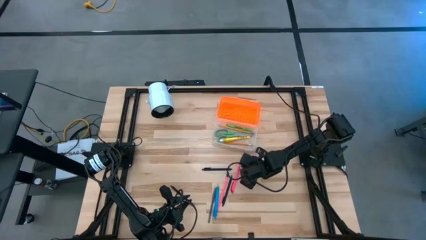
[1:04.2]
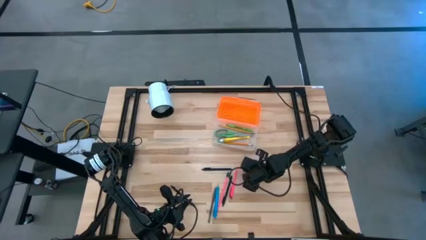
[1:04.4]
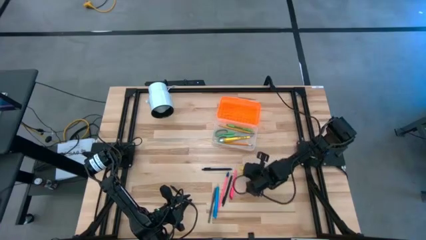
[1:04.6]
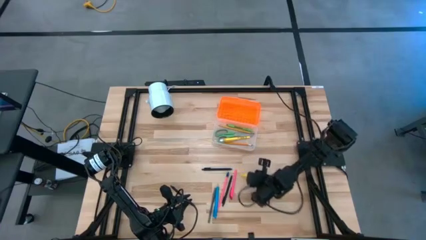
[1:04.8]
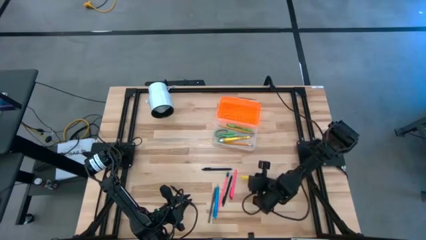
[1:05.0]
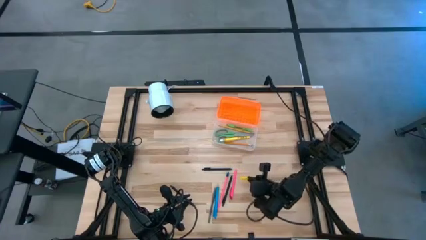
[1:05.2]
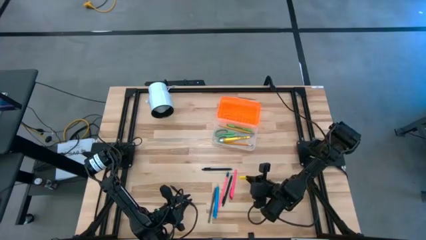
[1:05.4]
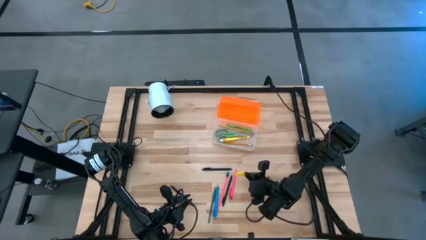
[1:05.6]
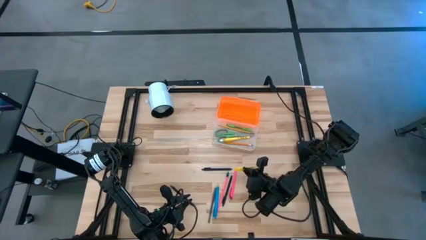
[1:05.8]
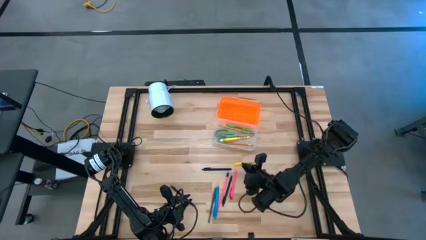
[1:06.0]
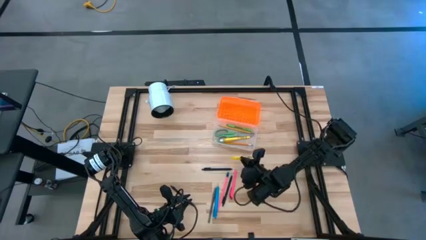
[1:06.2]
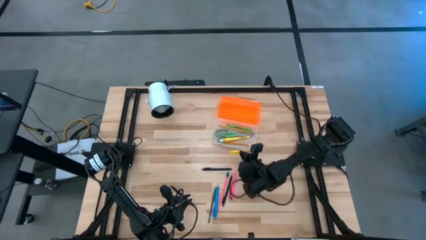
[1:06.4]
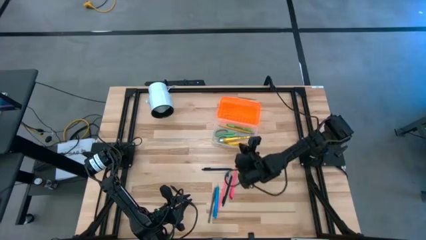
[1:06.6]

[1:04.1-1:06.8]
Task: Pick & place school supplies into a supply box
Put the yellow pen into the supply box

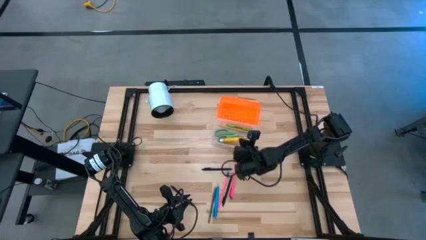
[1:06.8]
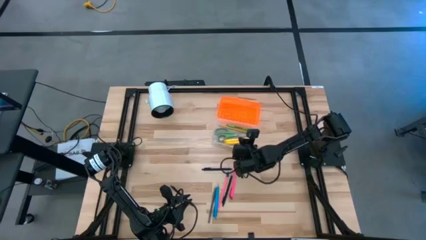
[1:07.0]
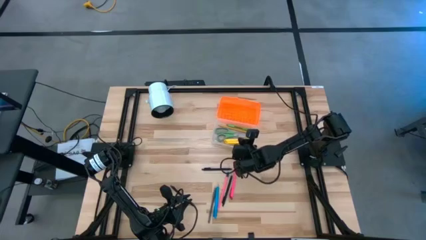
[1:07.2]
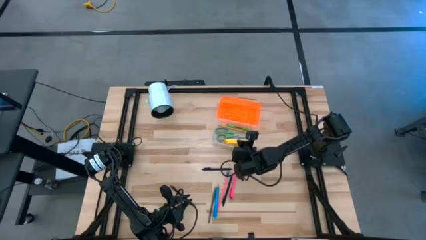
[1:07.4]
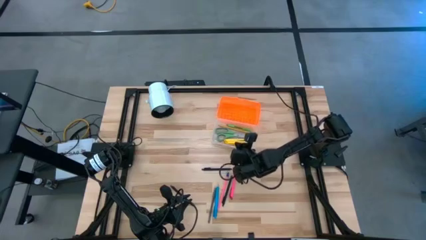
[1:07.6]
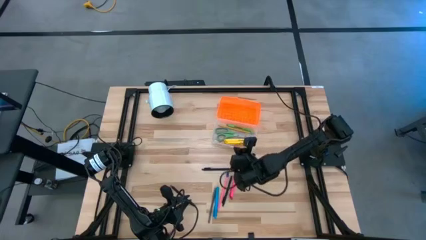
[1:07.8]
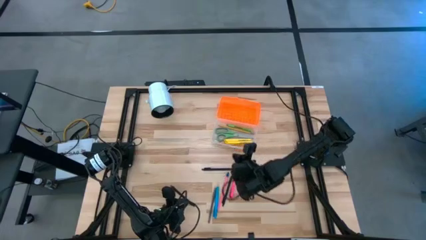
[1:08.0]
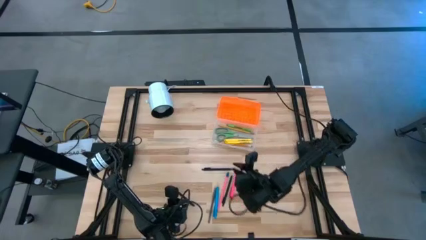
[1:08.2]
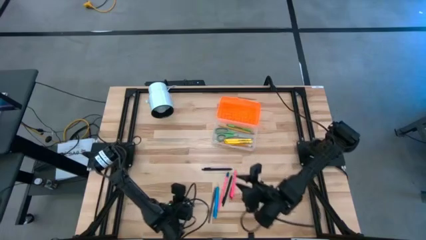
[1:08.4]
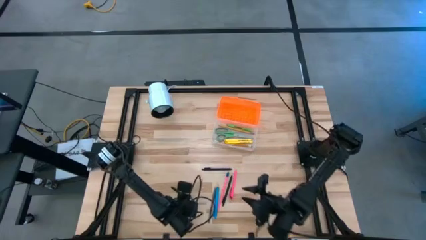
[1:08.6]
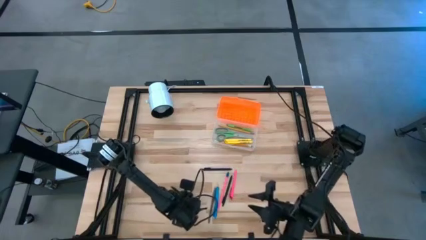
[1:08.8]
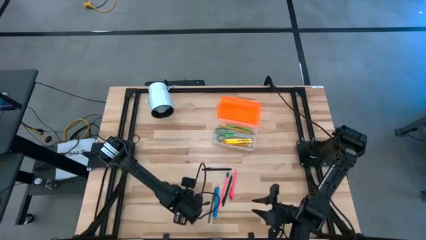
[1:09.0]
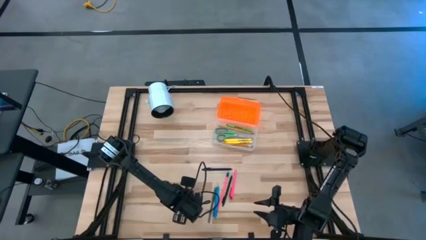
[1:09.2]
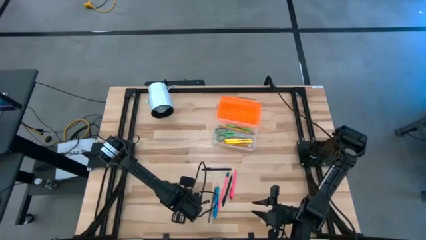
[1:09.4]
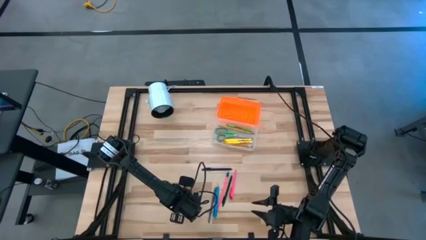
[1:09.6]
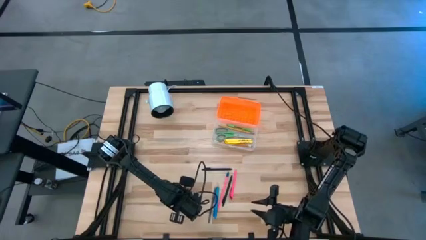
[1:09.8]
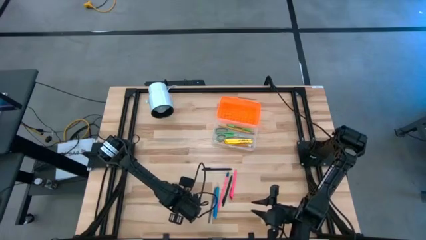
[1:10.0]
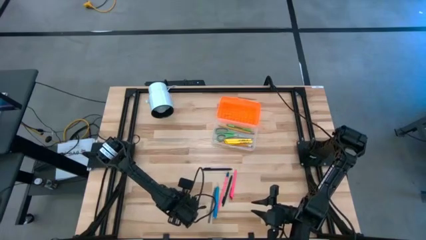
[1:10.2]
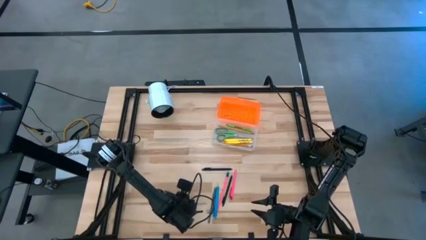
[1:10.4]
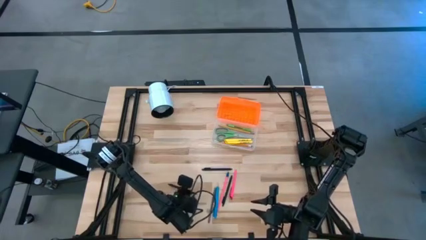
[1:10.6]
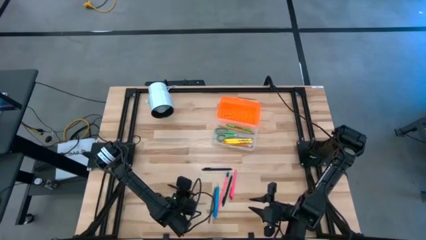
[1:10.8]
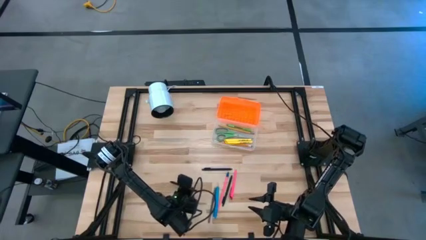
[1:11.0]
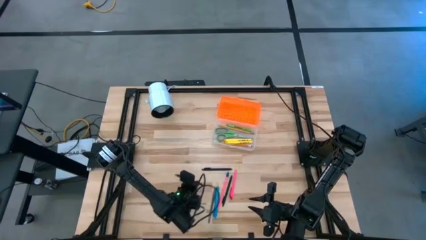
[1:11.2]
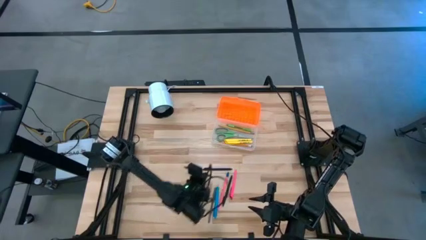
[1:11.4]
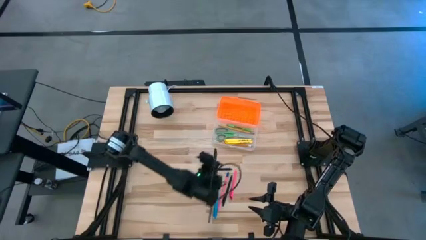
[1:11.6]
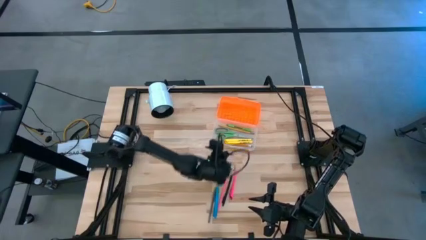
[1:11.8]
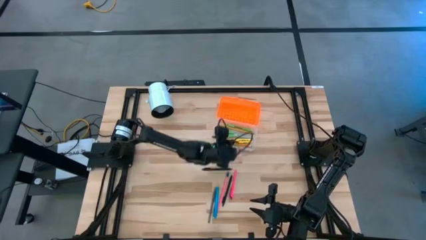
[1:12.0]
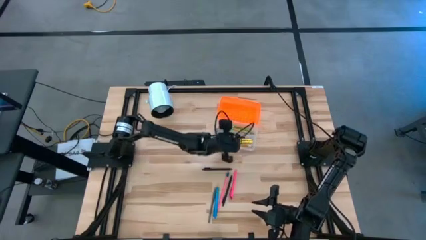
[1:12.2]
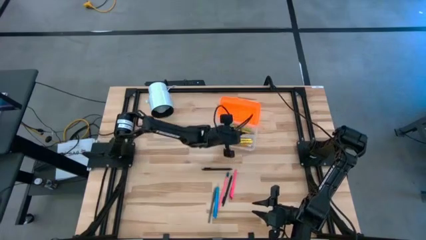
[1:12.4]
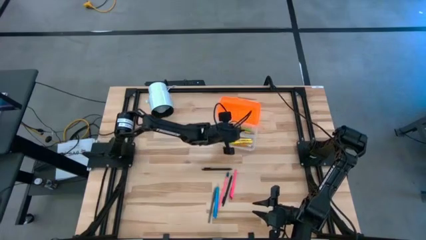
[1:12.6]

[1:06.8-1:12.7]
Put the bottom left black pen into the supply box

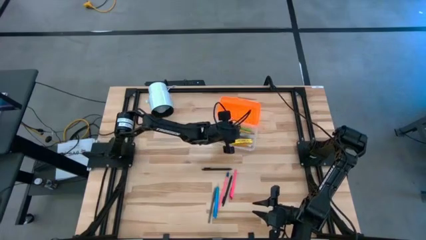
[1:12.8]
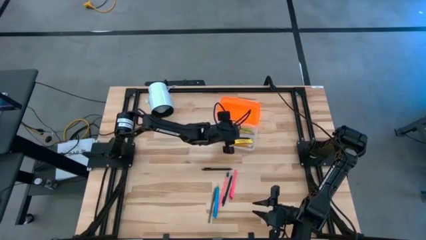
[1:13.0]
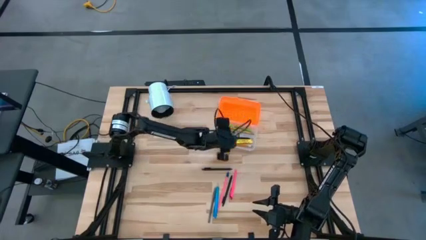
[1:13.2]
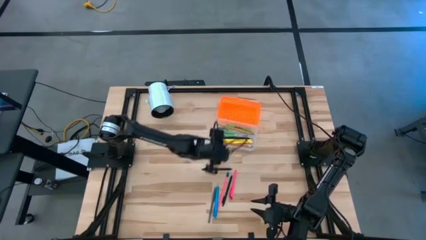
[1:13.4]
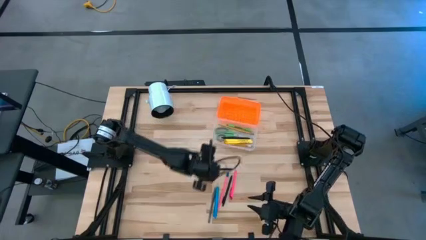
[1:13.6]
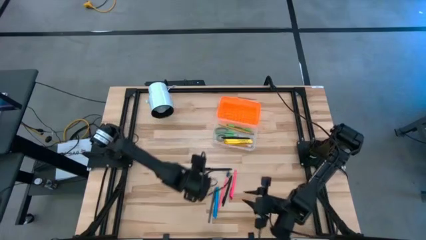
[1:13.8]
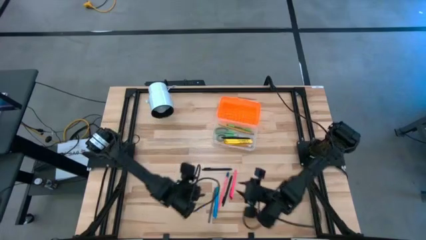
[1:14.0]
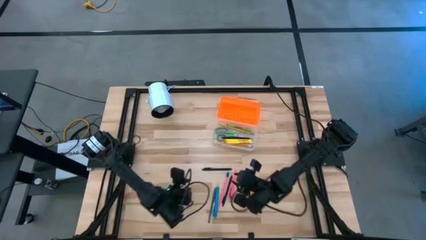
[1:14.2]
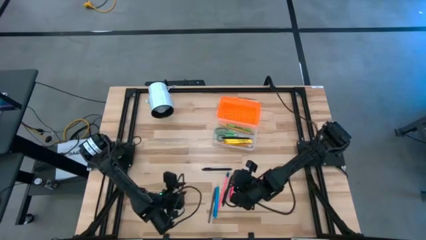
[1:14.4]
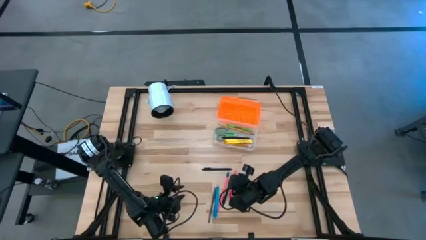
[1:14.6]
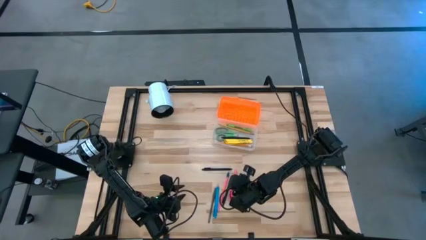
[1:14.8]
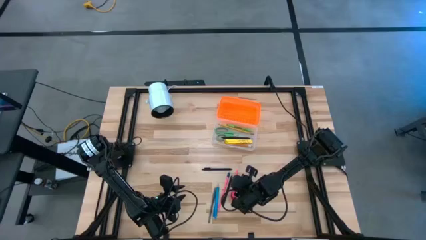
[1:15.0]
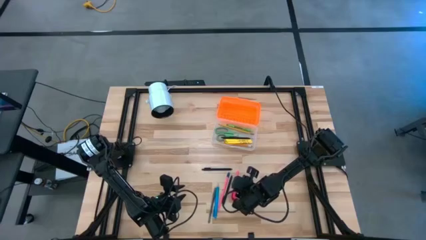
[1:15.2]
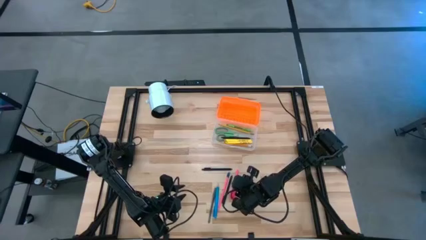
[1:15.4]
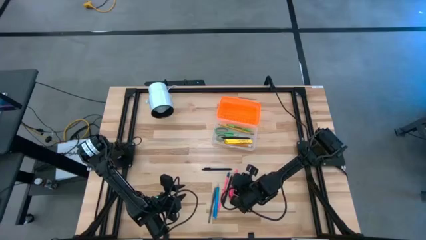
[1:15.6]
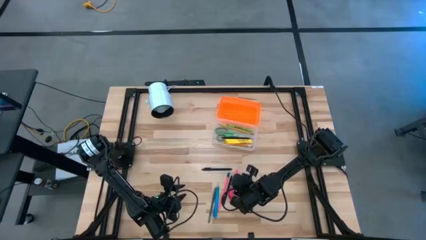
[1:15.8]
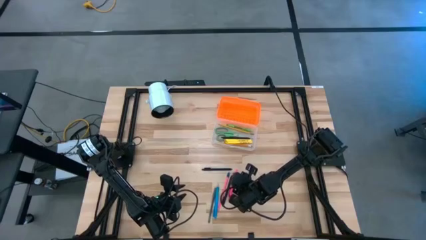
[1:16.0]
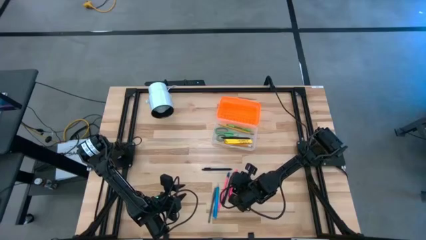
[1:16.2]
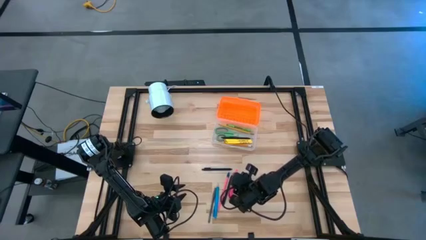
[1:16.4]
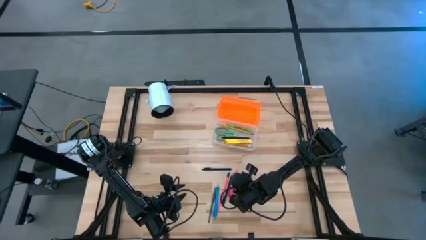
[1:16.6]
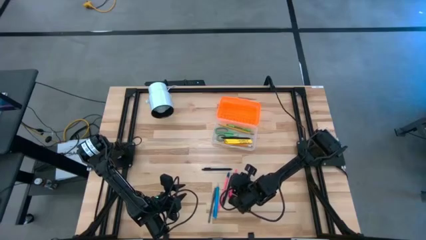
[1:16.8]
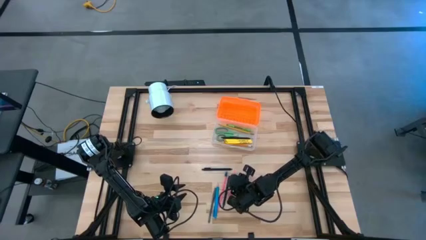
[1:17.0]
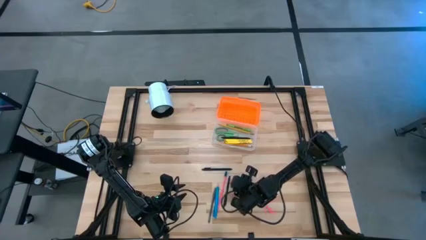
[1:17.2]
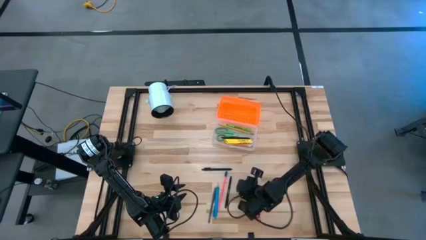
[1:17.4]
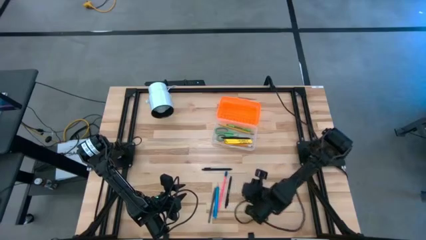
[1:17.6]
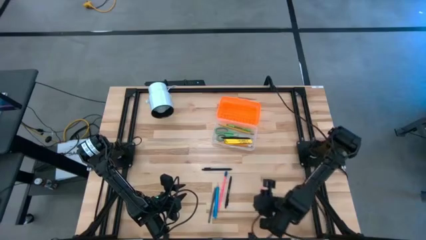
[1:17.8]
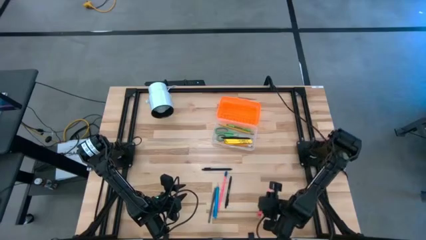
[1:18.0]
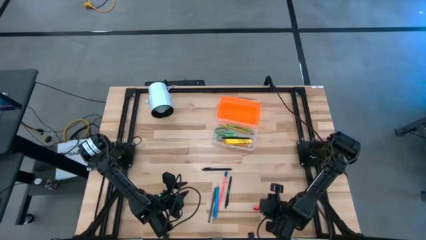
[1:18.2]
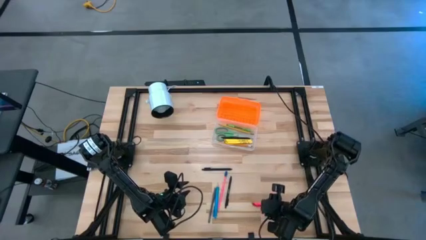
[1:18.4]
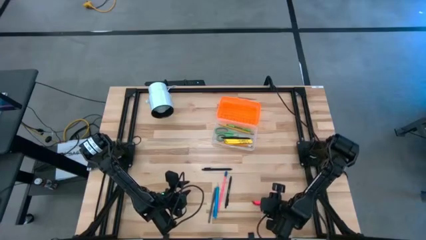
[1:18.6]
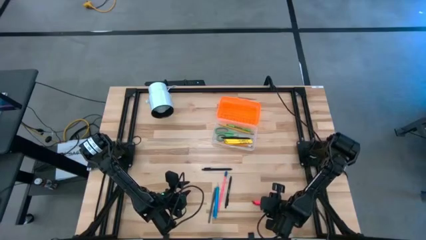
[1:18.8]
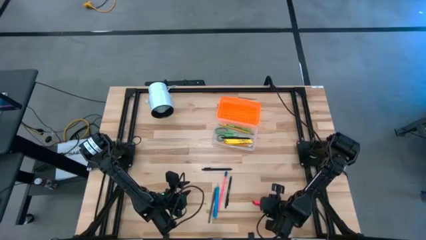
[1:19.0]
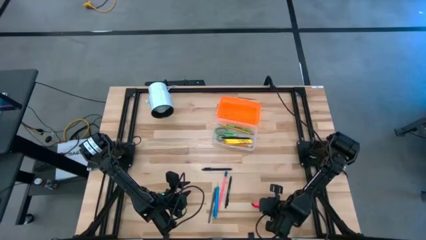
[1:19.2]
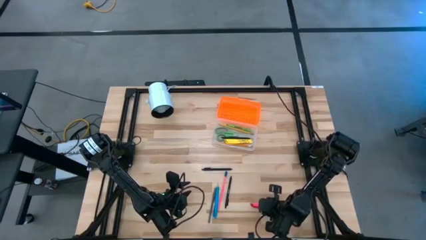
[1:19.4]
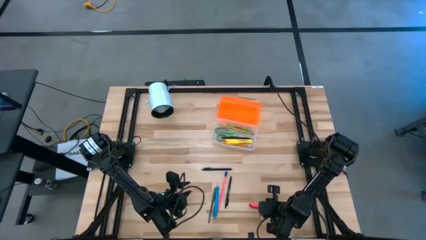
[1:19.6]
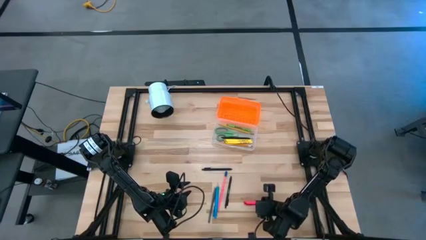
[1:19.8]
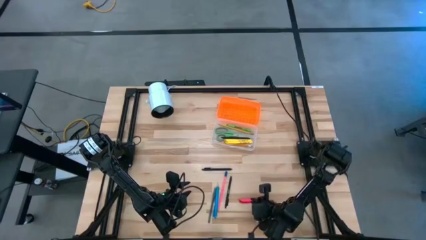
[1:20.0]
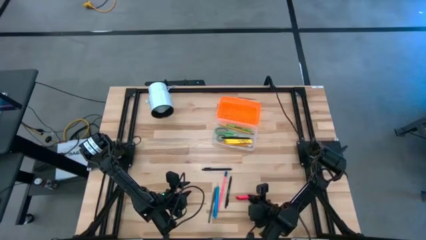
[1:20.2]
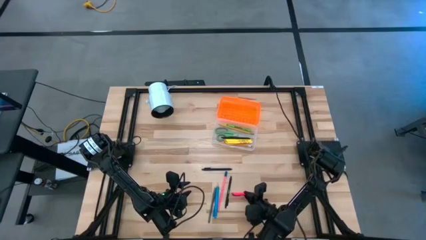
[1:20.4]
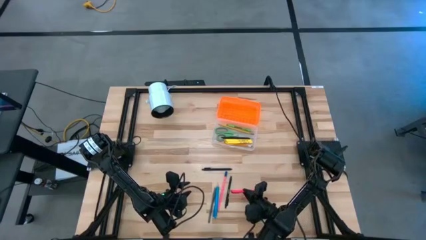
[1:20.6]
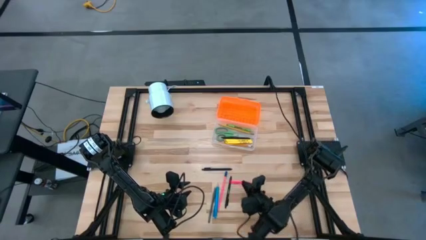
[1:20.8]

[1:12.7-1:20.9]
Put the pink pen into the supply box
